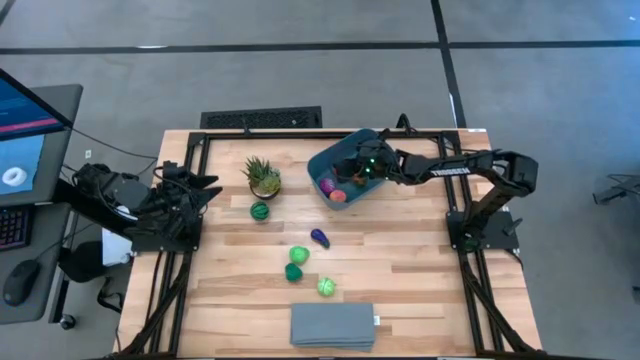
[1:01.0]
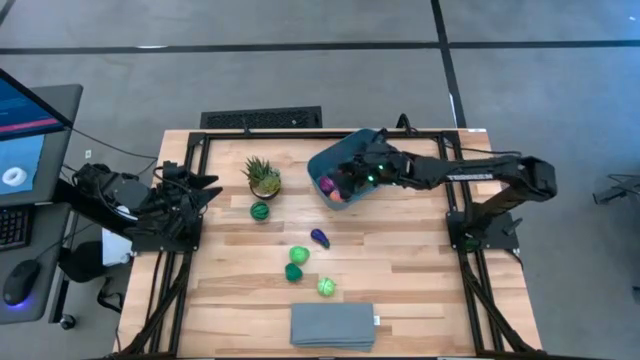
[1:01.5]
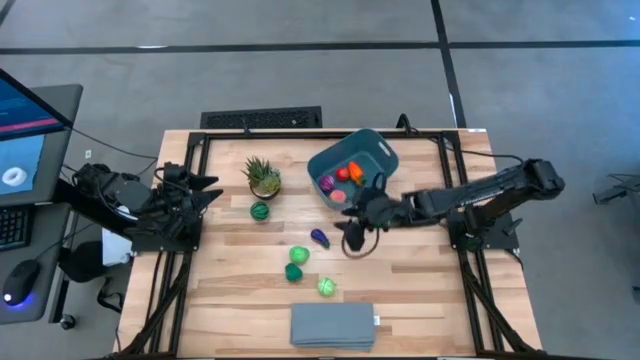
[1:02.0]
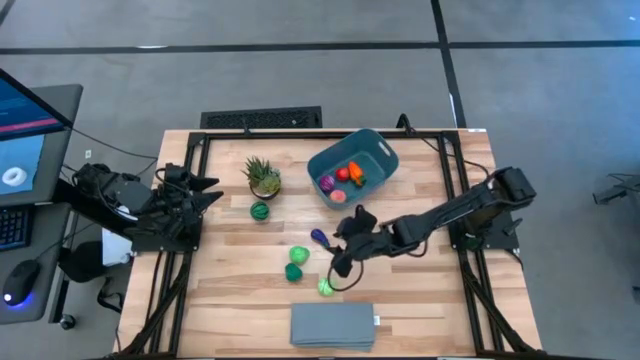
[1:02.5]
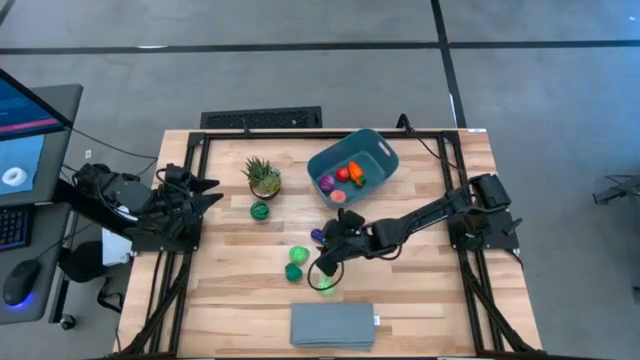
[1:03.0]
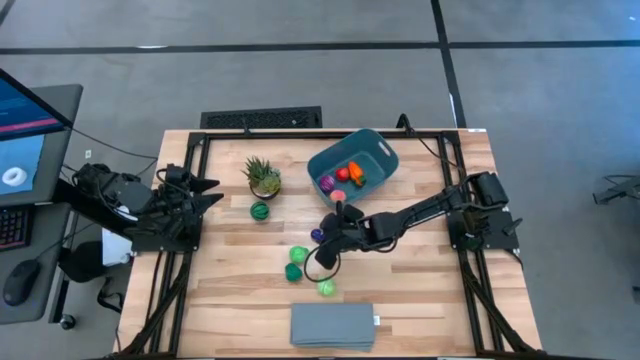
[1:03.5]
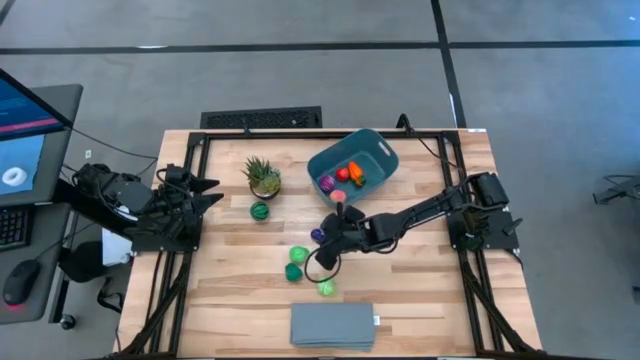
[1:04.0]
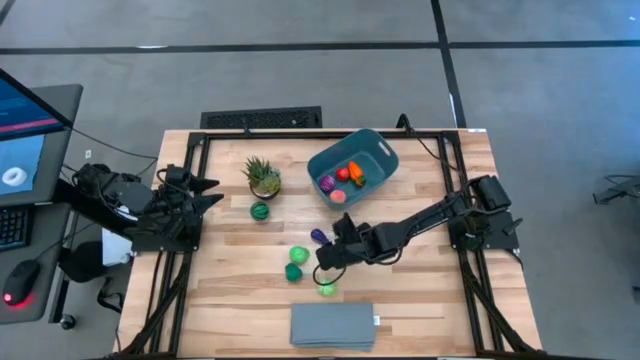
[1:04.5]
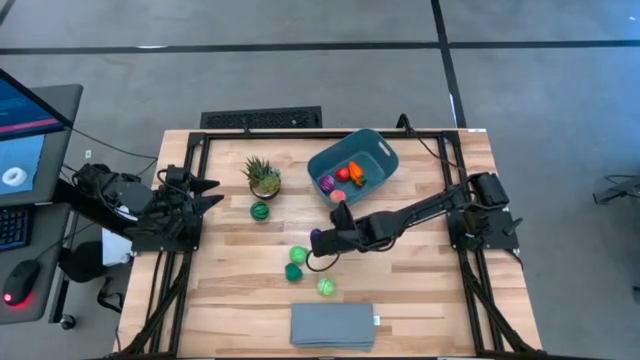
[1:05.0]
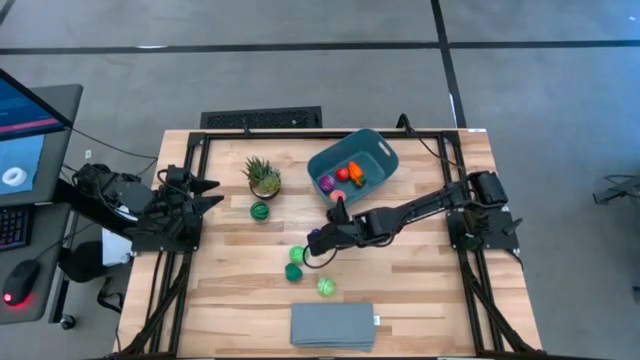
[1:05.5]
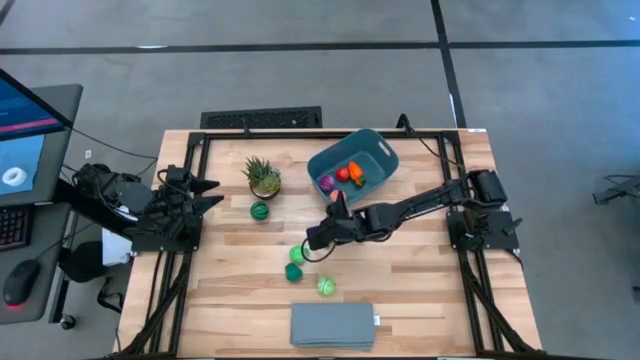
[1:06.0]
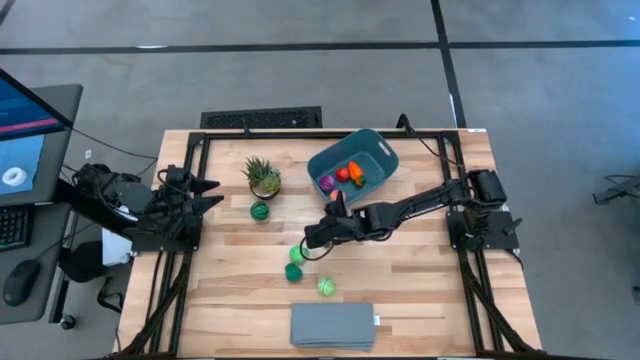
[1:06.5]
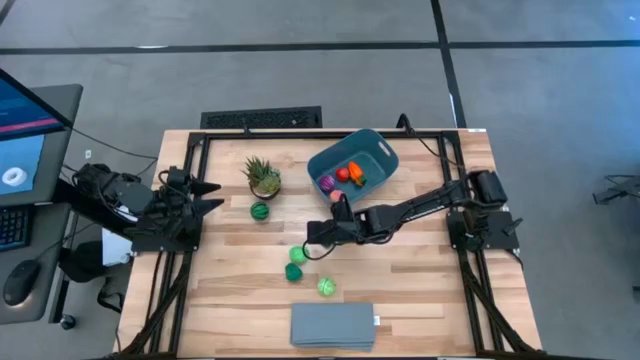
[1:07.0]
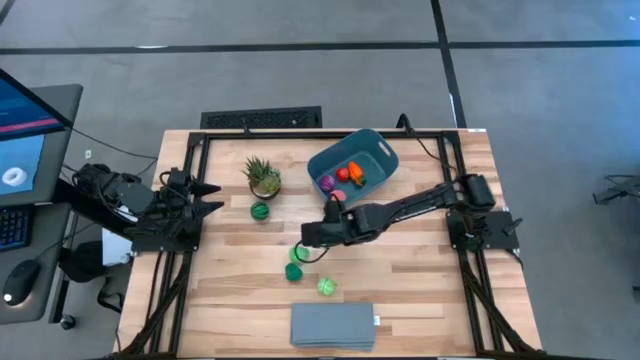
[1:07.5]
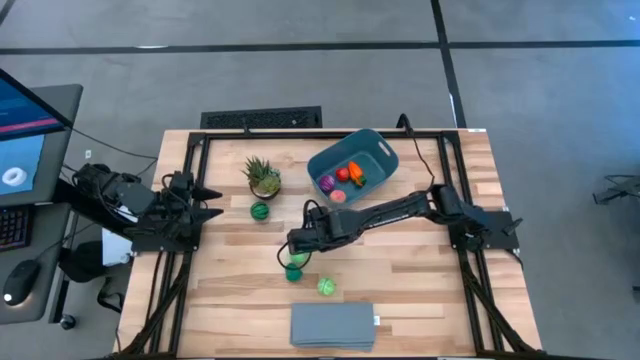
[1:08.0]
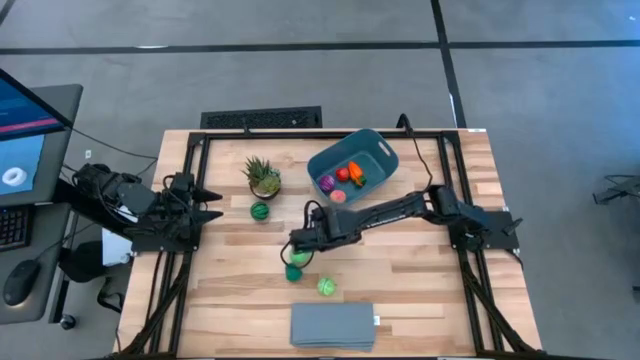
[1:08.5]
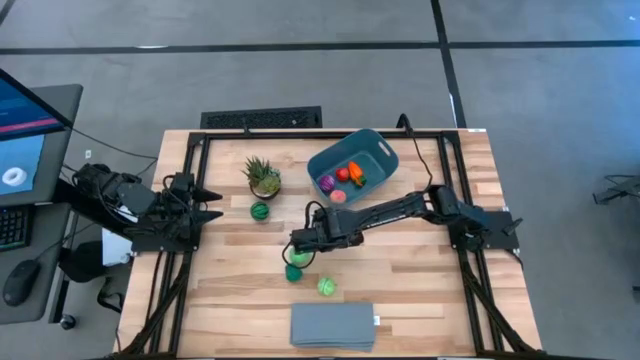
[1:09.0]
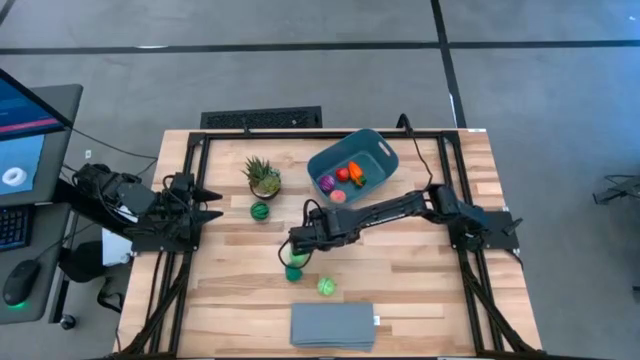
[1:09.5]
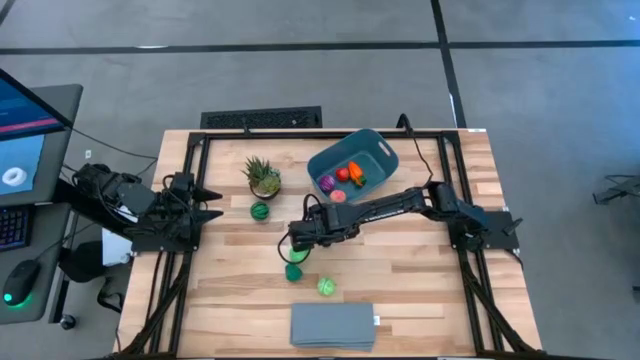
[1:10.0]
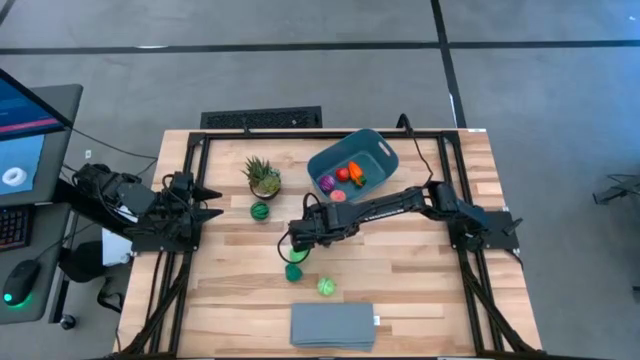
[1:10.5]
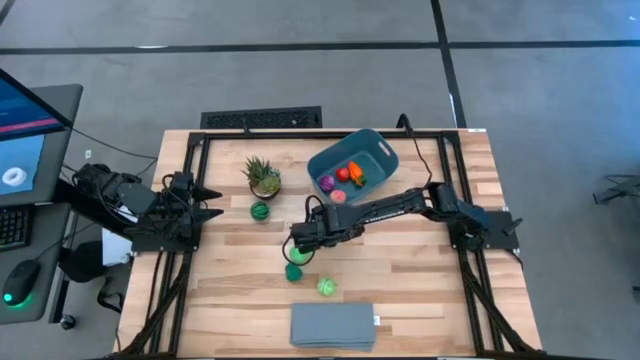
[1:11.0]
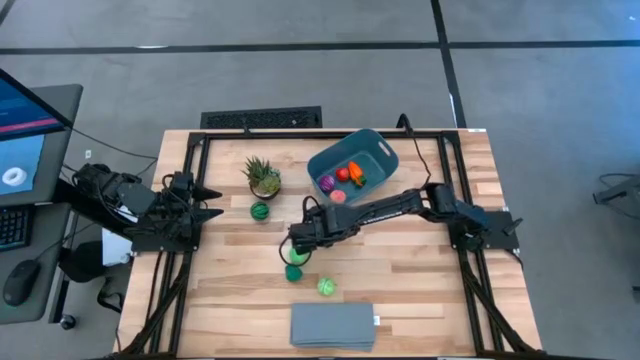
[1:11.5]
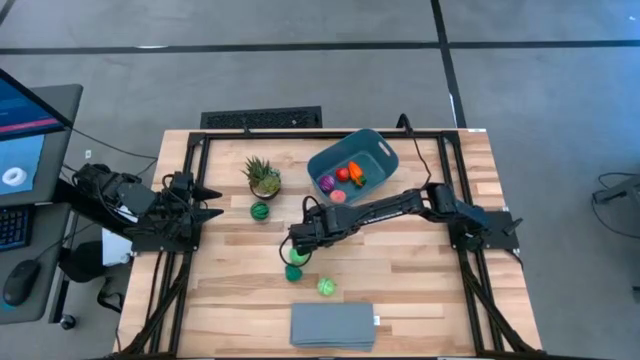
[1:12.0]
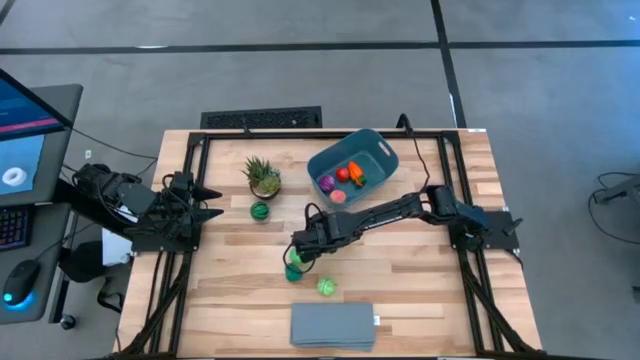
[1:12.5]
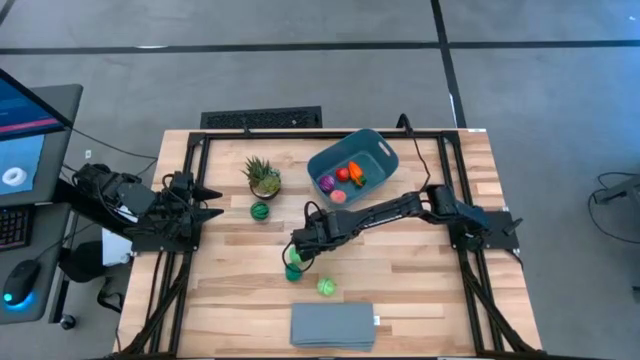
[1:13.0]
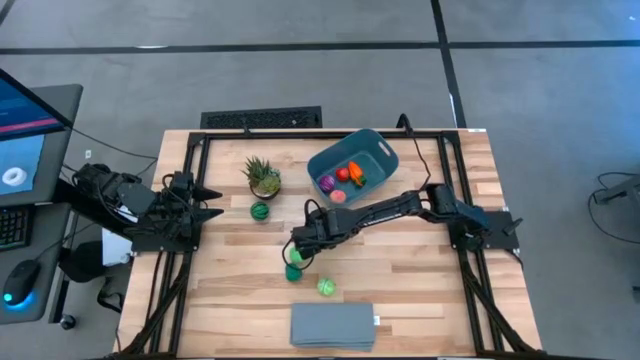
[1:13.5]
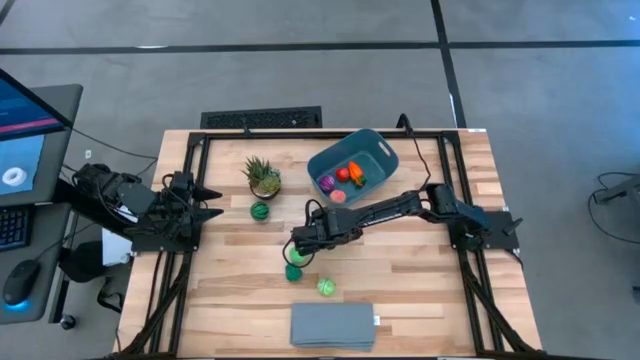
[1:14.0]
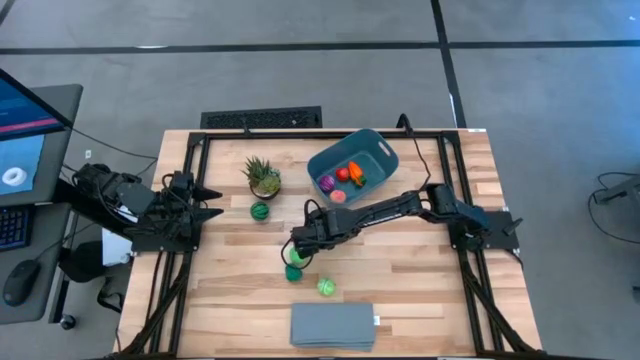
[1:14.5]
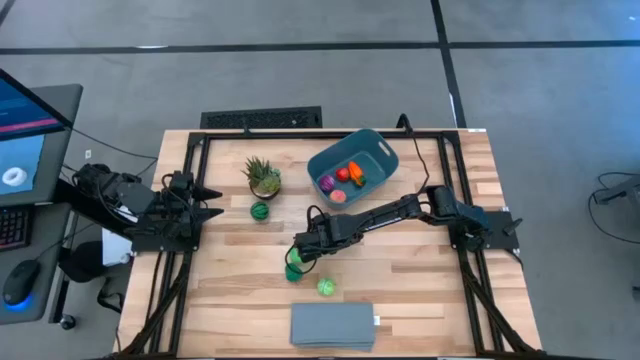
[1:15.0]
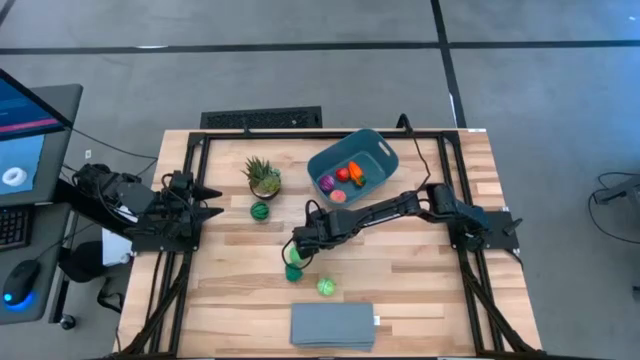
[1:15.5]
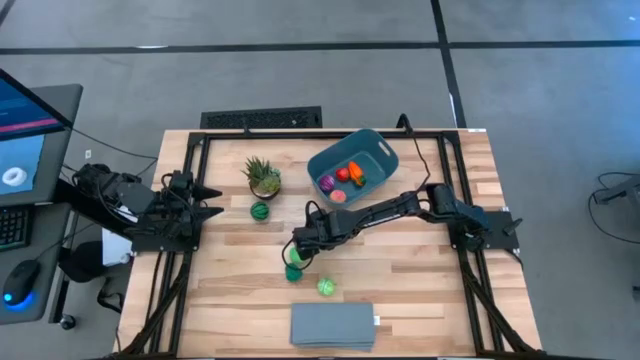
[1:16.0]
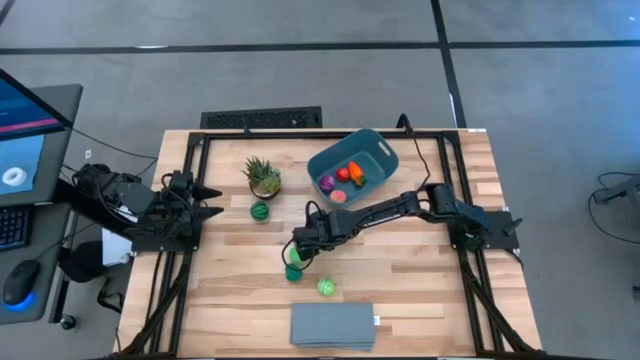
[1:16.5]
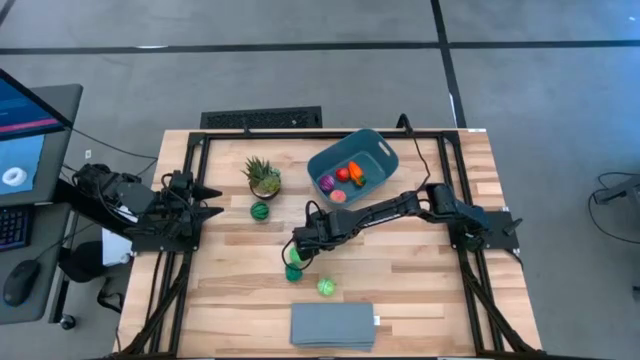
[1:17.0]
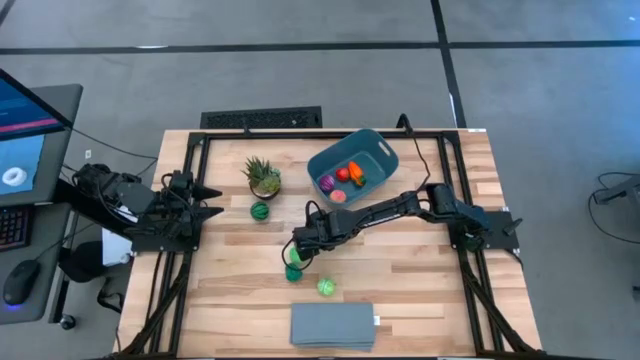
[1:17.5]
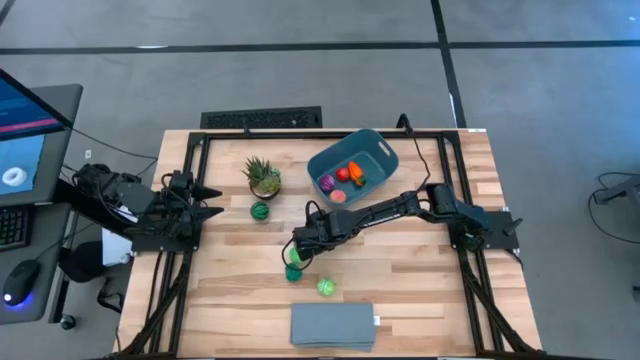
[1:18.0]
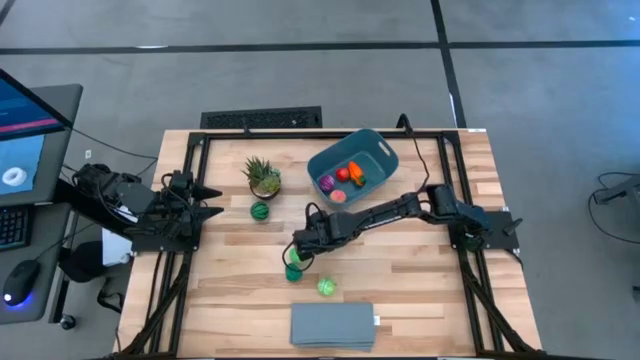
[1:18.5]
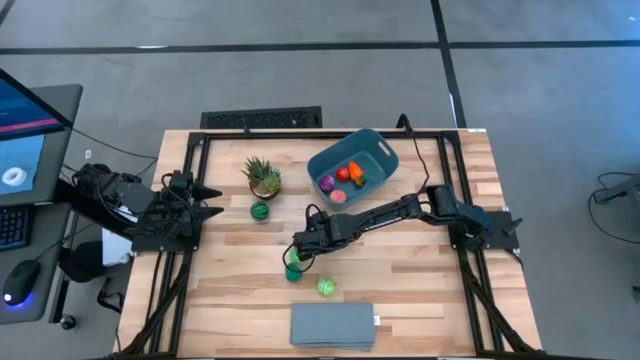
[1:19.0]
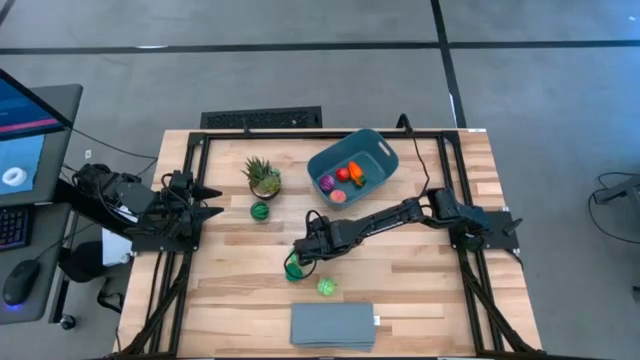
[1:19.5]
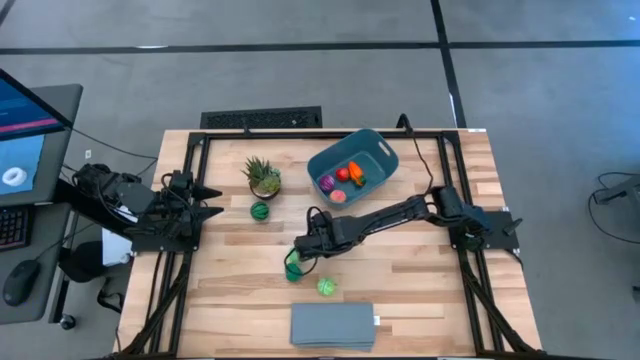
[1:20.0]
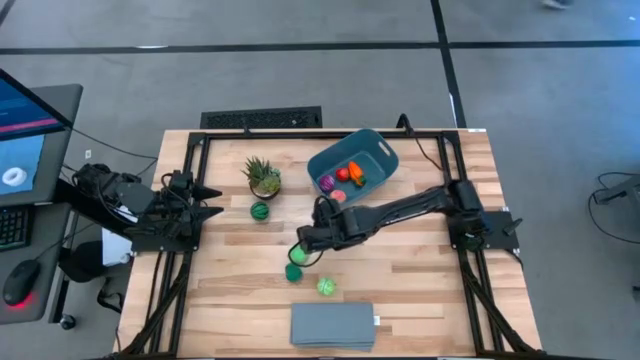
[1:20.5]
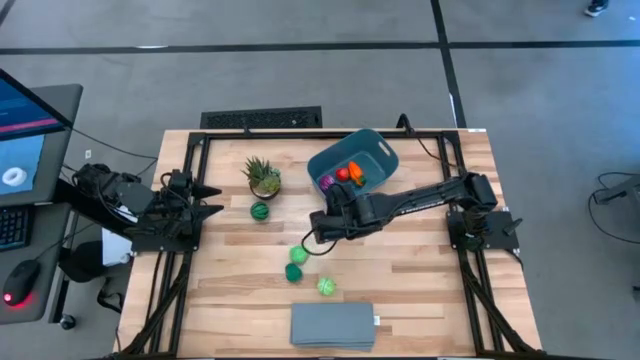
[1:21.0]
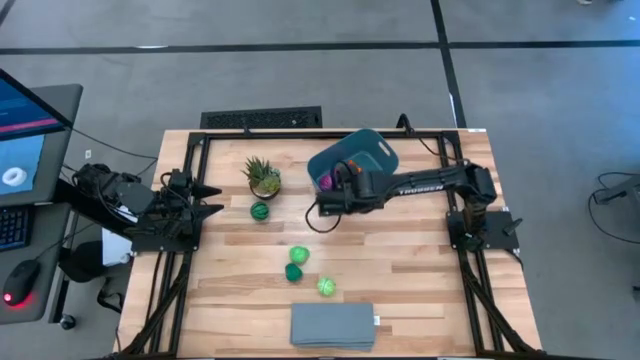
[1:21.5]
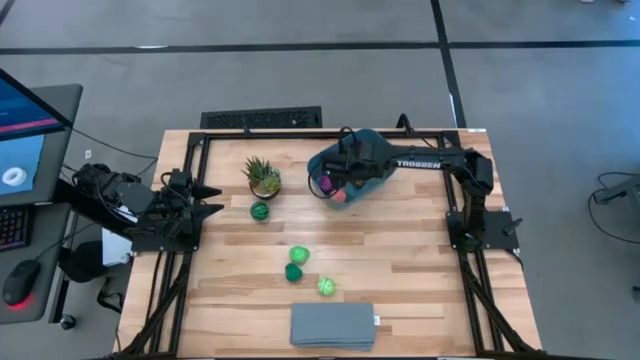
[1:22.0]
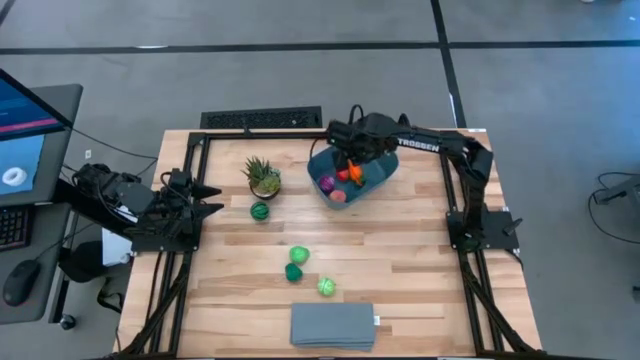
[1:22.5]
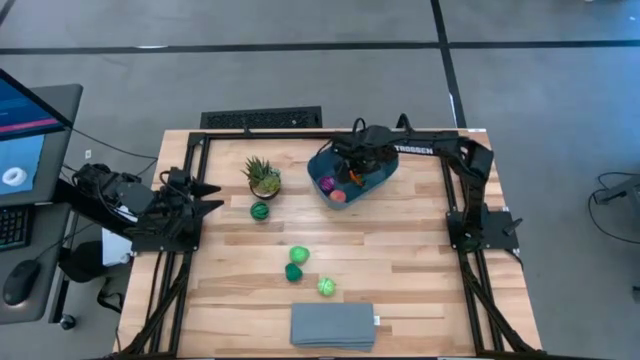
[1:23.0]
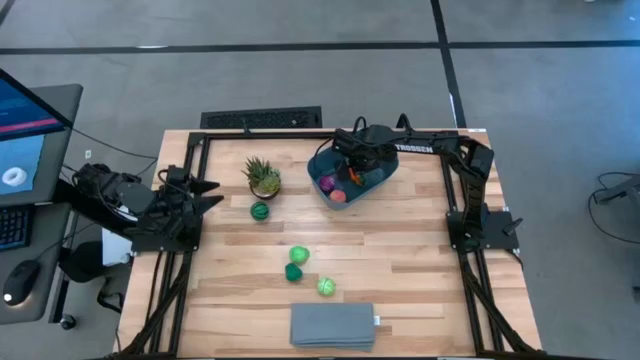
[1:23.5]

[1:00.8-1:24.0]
Task: Pick and placing Produce into tupperware
Put the eggplant into the bin
